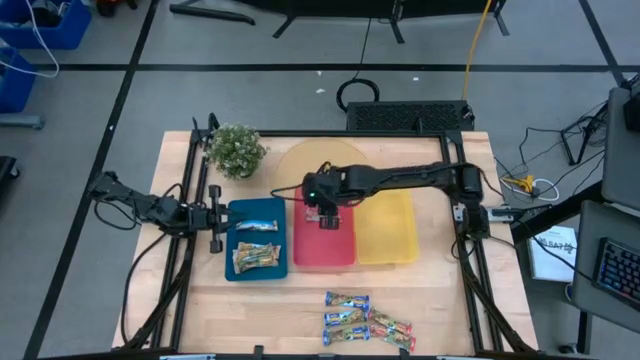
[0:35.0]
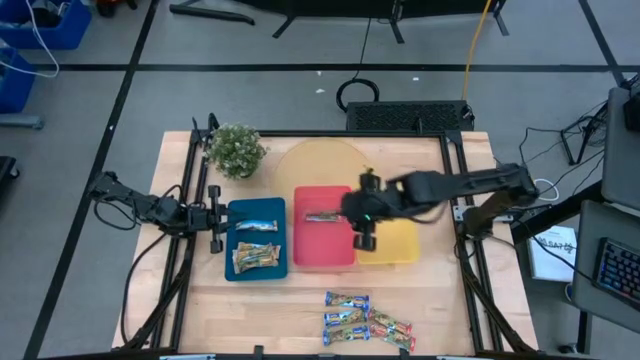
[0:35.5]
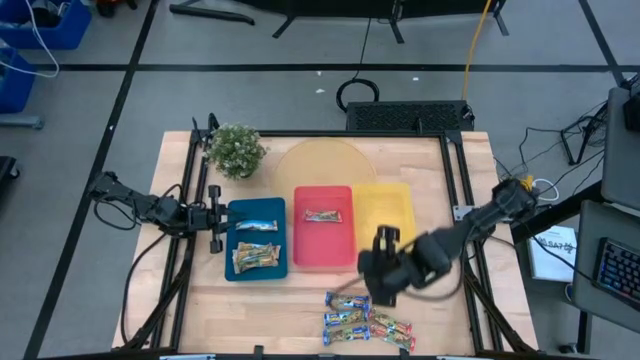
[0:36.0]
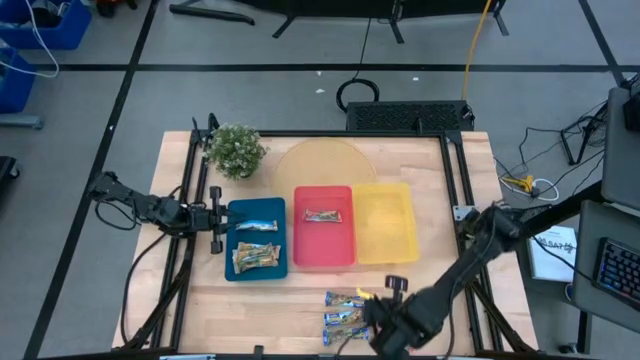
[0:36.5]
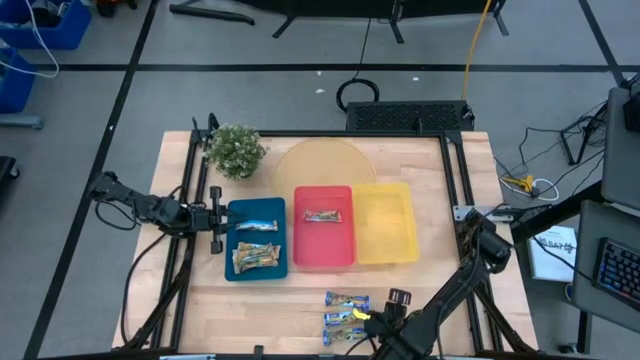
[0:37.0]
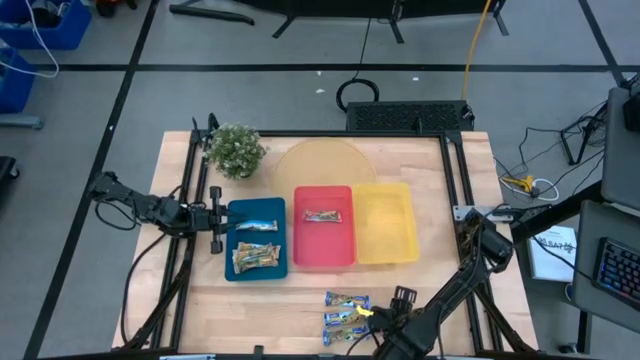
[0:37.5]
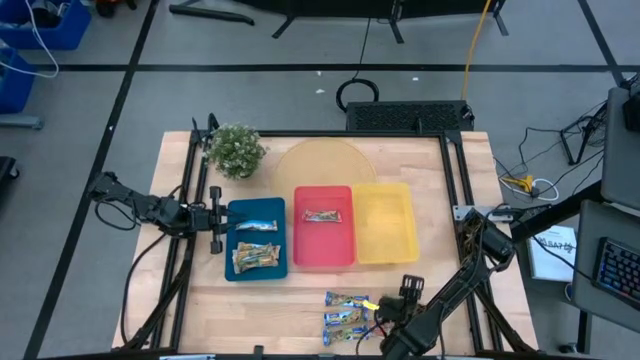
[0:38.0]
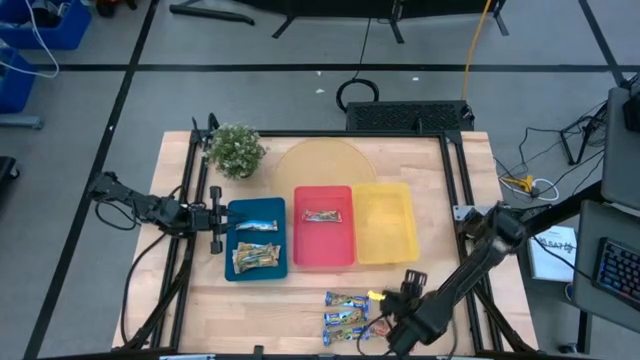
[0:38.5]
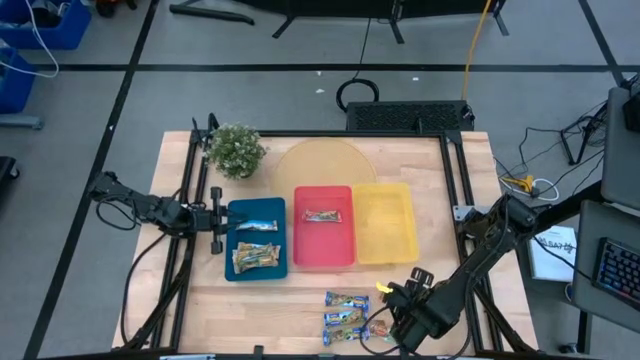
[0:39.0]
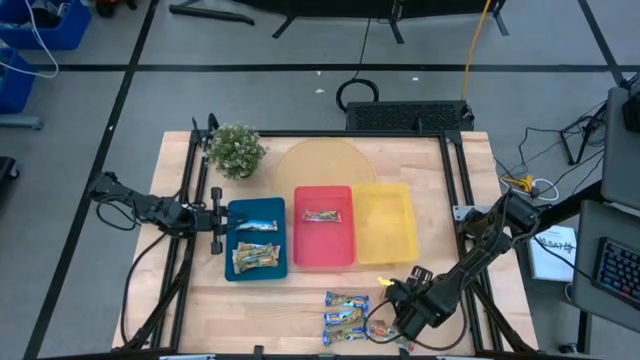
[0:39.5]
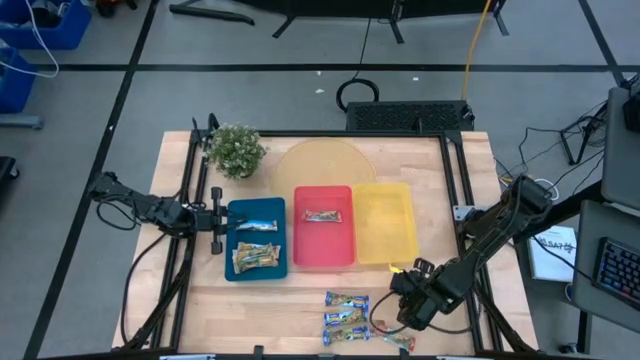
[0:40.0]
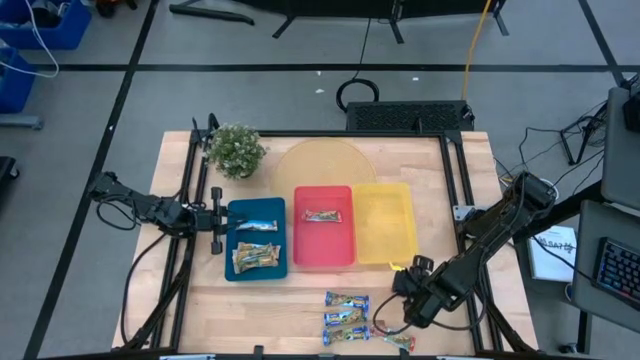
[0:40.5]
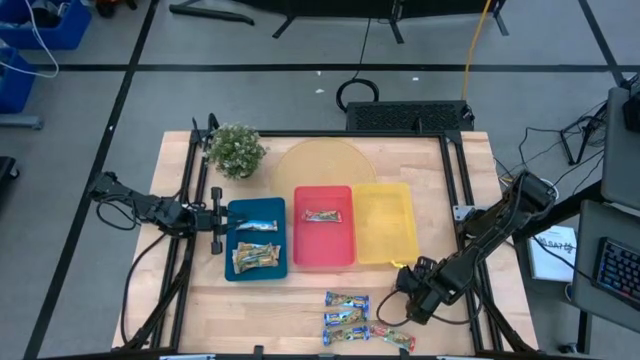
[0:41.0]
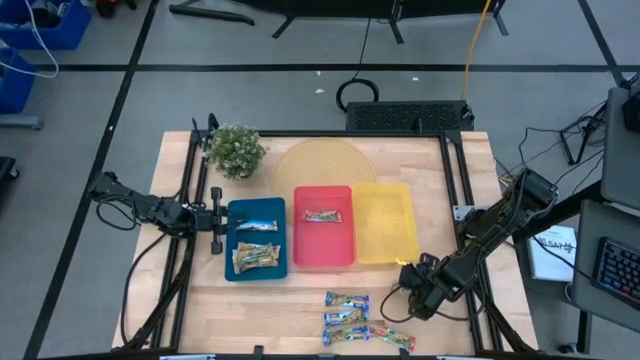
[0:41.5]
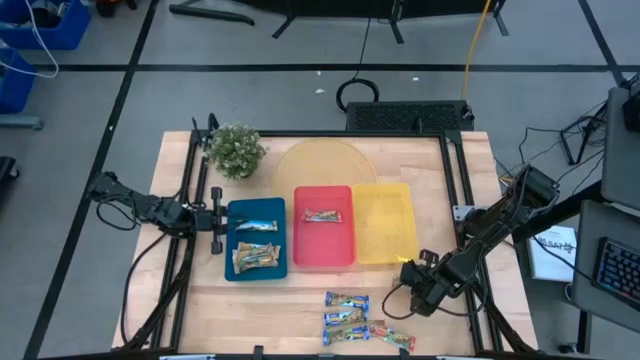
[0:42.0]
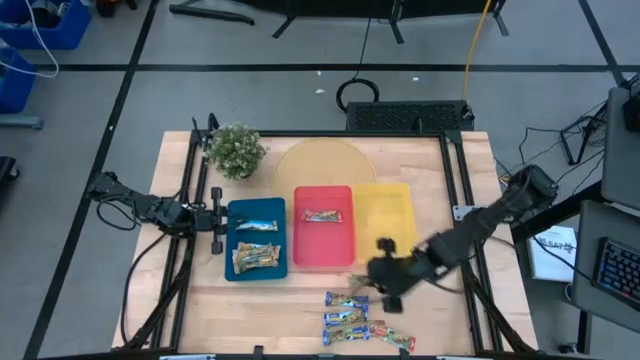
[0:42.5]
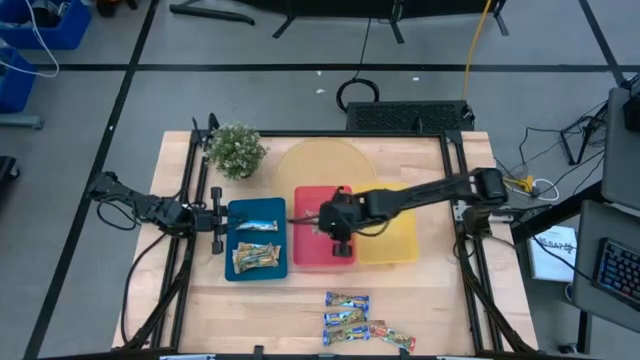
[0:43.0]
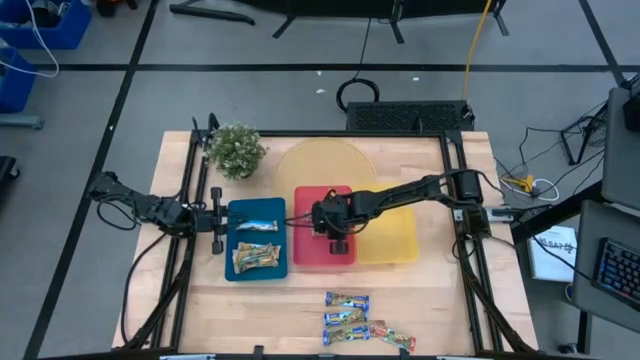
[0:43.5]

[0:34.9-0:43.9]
Task: Pick and place Granola Bars by type
Put the red granola bar into the red bin

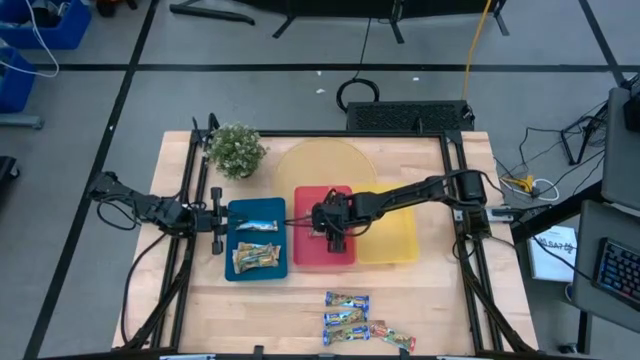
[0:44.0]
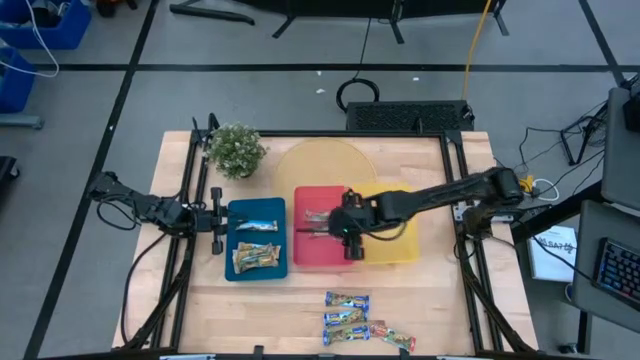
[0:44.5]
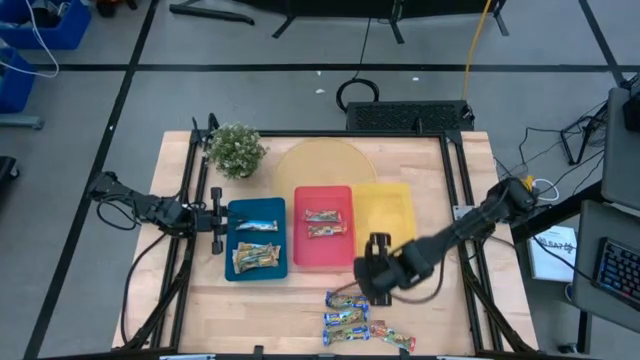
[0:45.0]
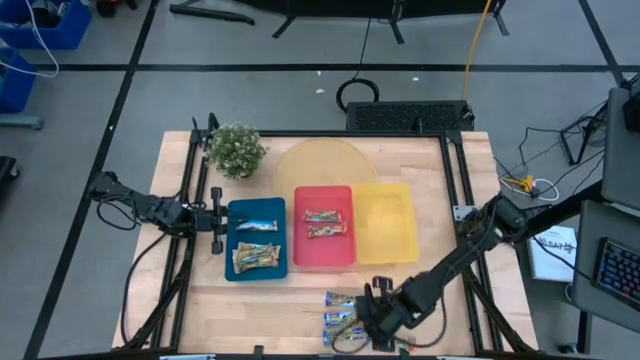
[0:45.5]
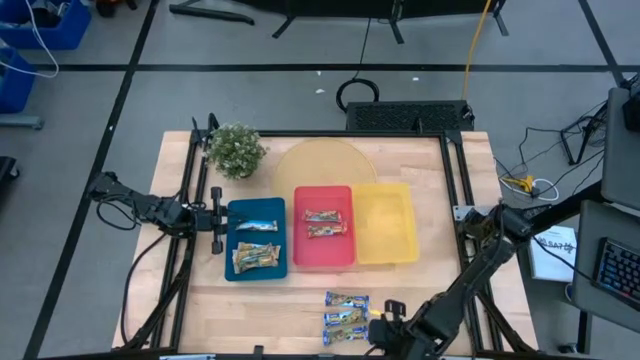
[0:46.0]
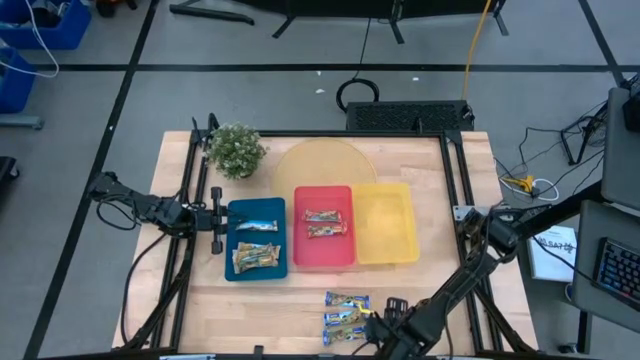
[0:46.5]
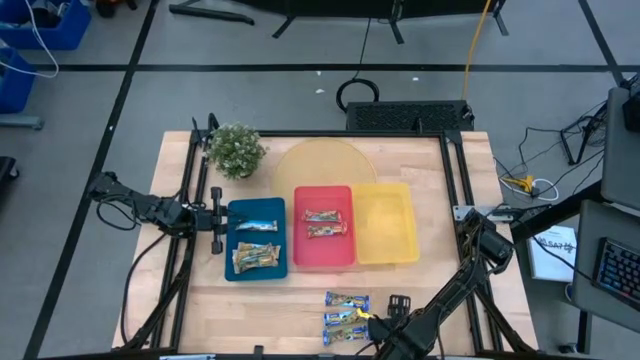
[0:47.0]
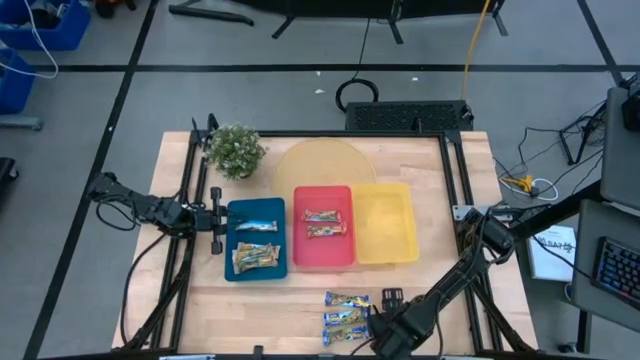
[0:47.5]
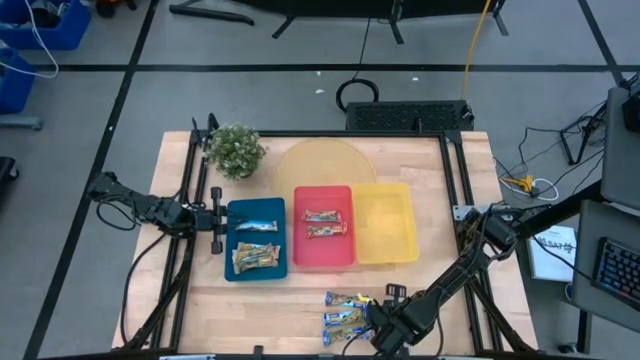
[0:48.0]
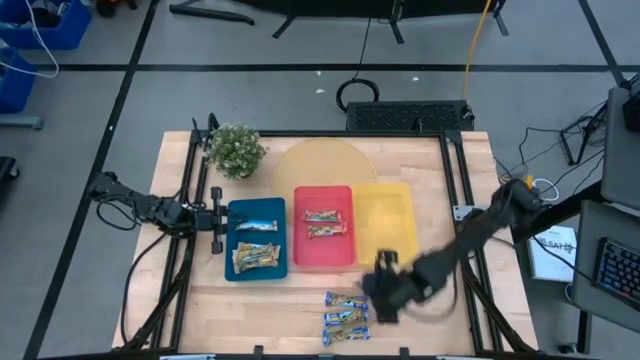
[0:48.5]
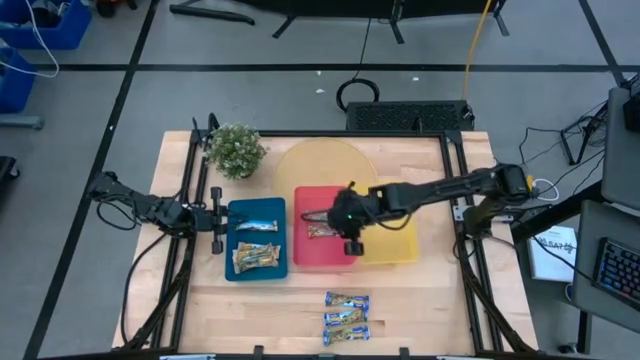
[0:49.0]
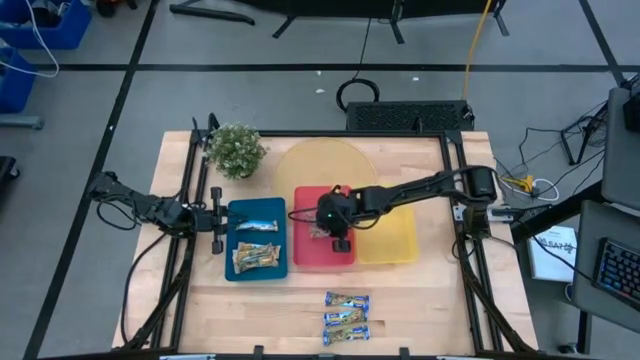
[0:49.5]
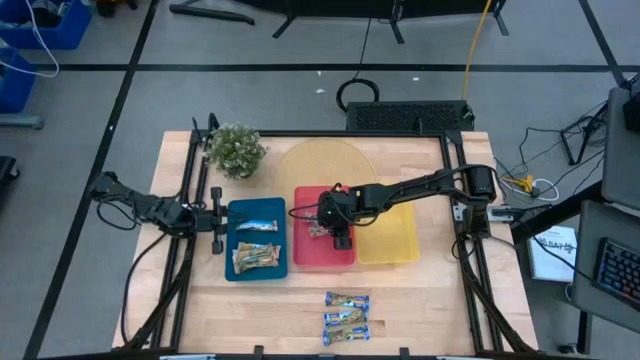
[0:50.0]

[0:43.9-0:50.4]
Put the red granola bar into the red bin

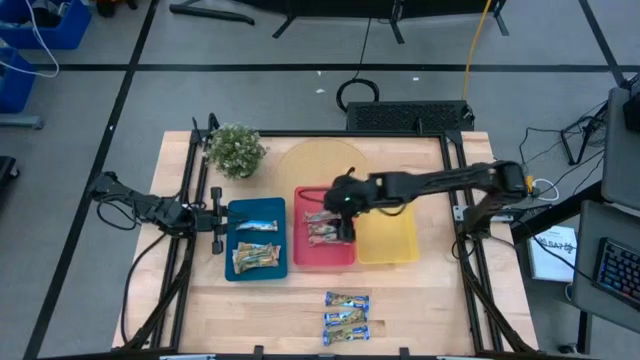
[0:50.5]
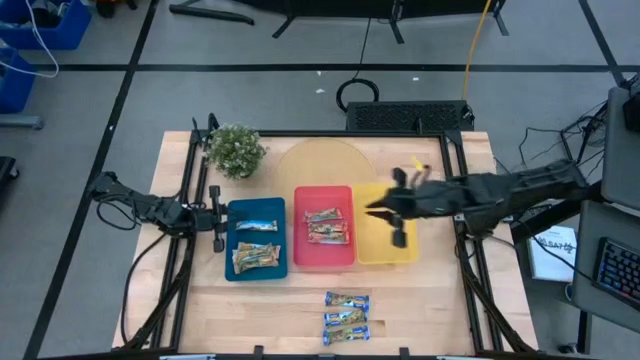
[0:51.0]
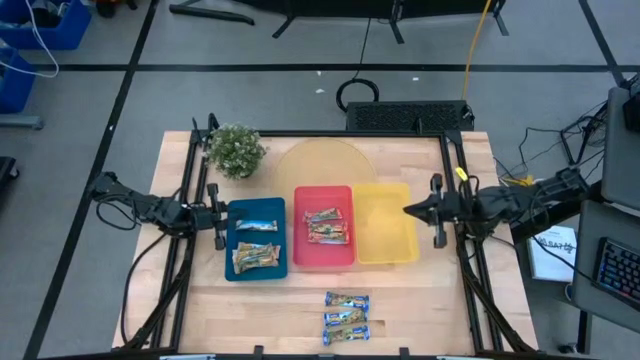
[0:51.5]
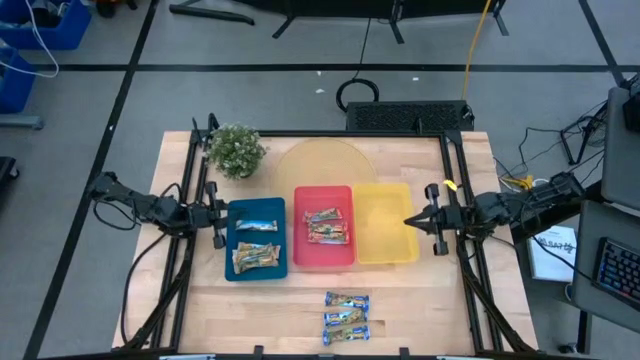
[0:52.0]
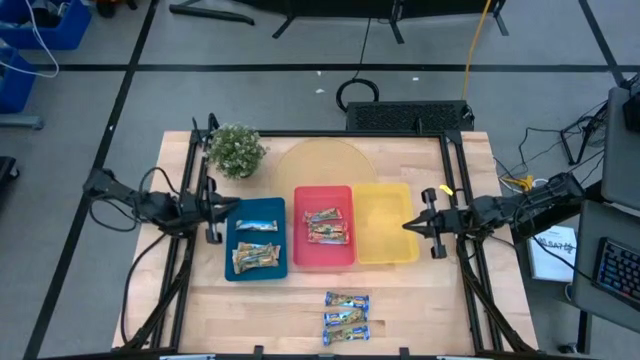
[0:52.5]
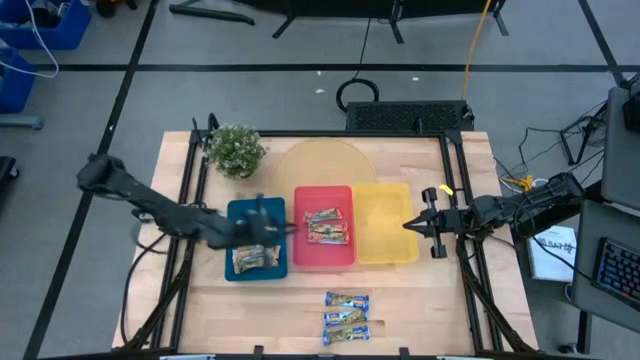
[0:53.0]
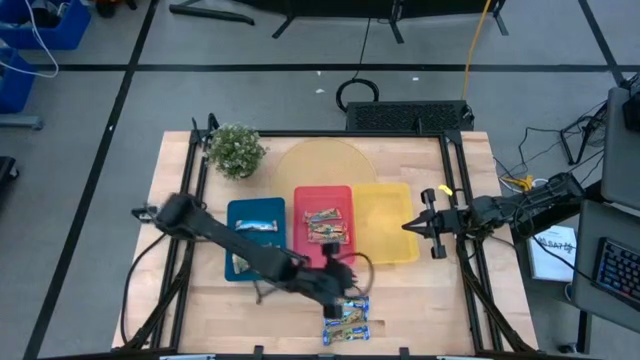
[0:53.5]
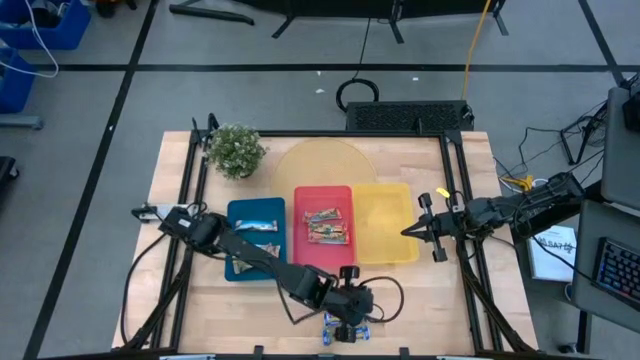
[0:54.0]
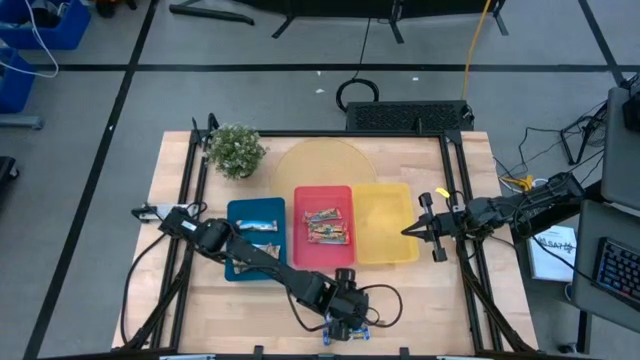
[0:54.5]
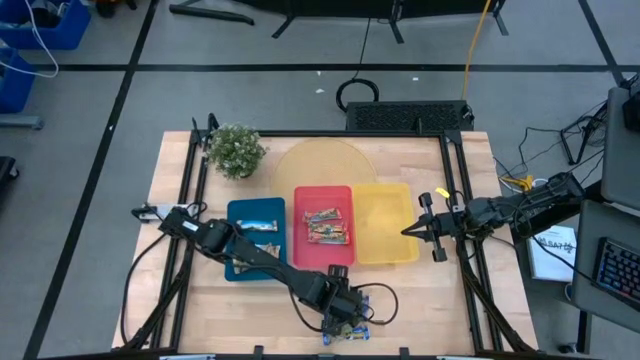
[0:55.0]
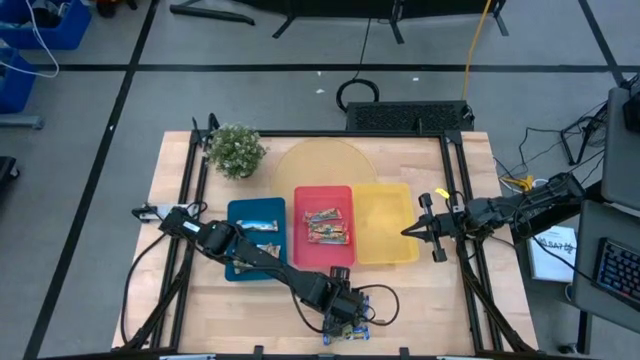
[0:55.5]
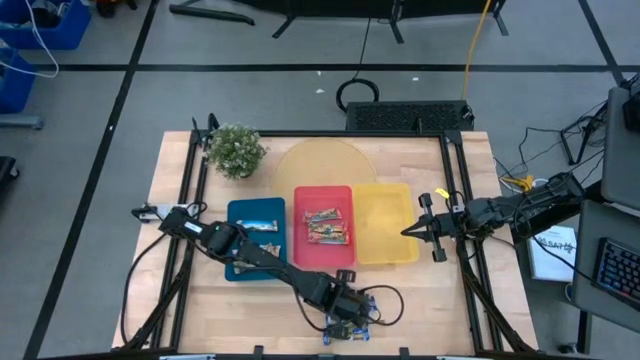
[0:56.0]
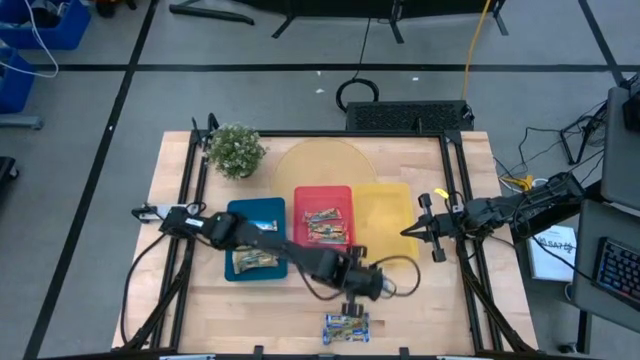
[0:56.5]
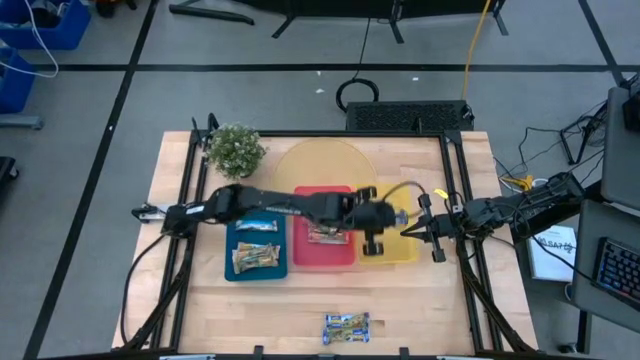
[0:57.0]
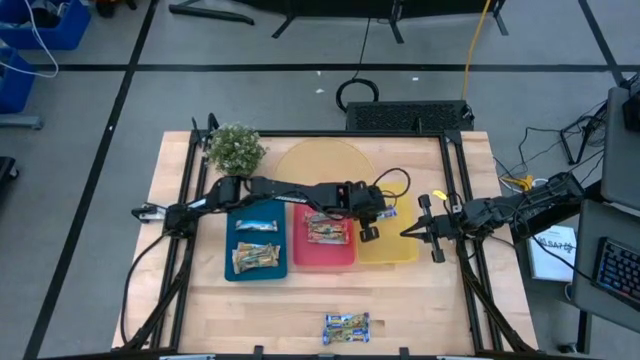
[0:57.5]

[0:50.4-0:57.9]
Put the blue granola bar into the yellow bin
